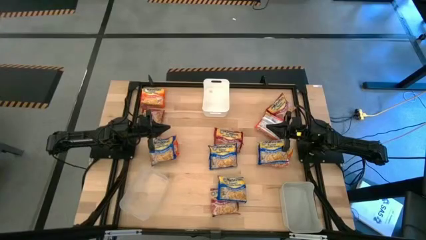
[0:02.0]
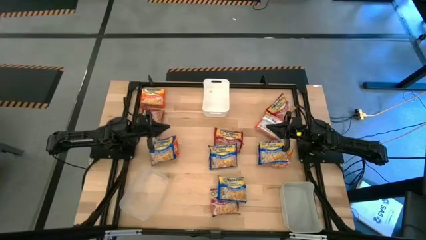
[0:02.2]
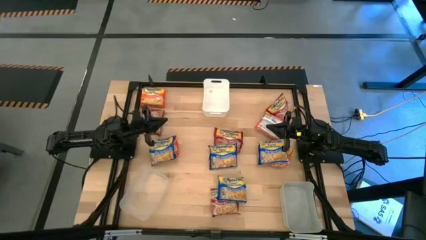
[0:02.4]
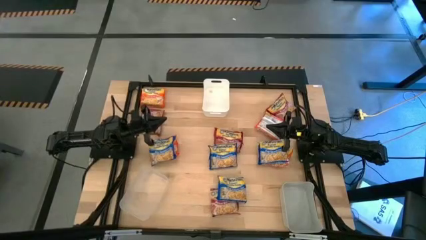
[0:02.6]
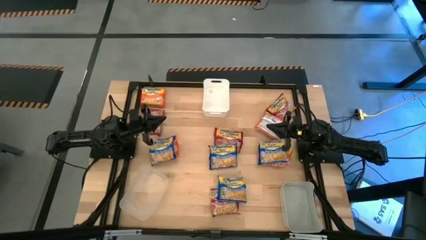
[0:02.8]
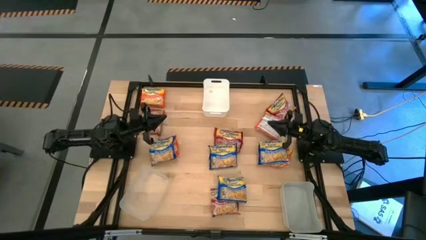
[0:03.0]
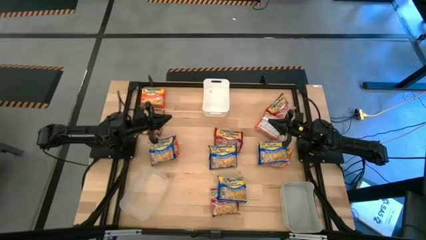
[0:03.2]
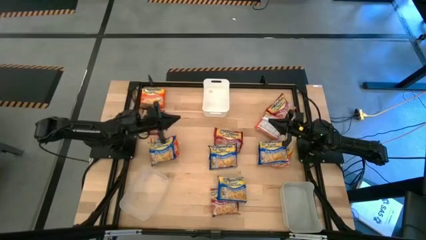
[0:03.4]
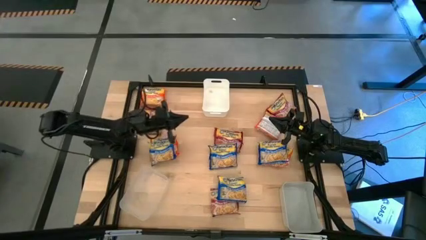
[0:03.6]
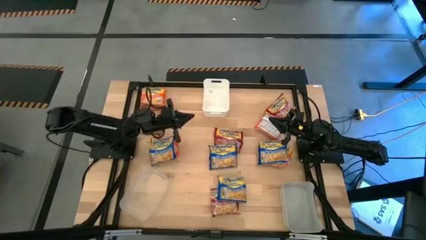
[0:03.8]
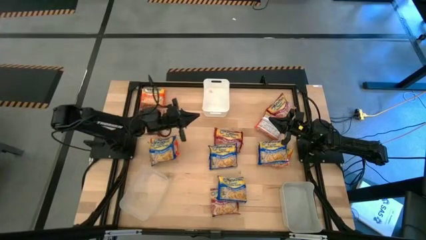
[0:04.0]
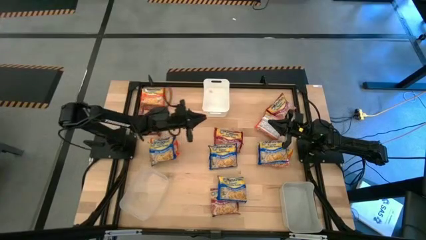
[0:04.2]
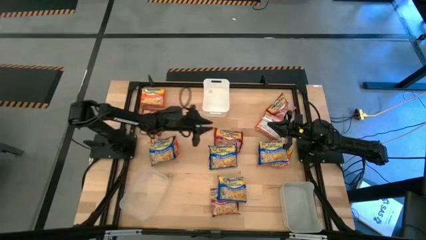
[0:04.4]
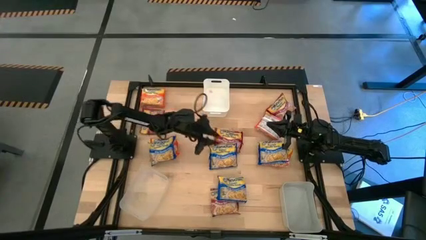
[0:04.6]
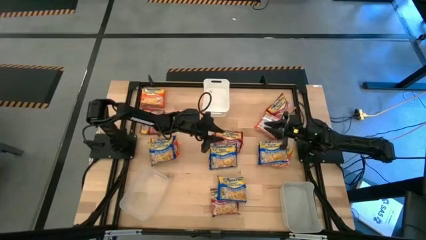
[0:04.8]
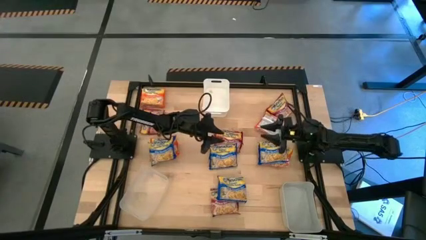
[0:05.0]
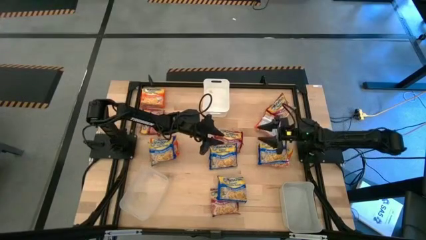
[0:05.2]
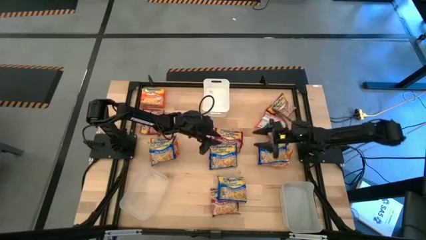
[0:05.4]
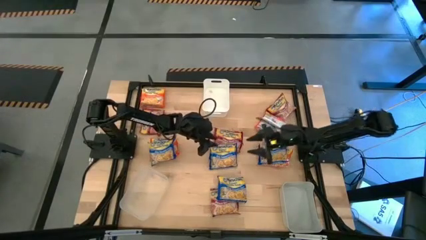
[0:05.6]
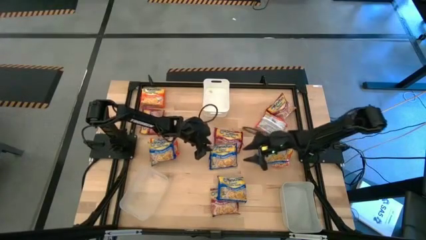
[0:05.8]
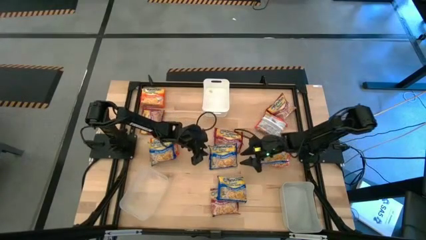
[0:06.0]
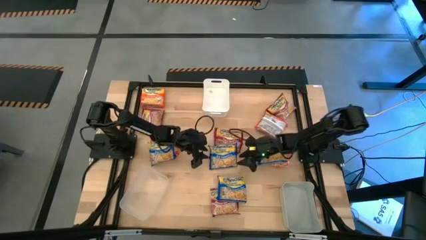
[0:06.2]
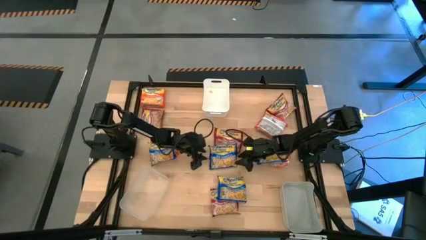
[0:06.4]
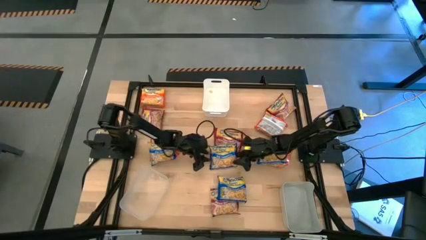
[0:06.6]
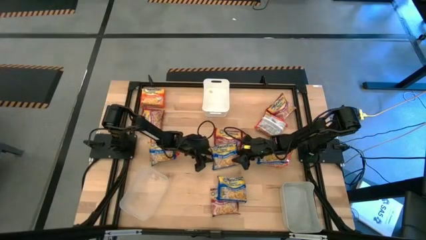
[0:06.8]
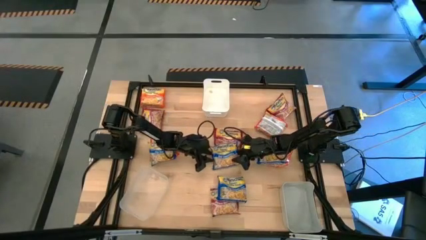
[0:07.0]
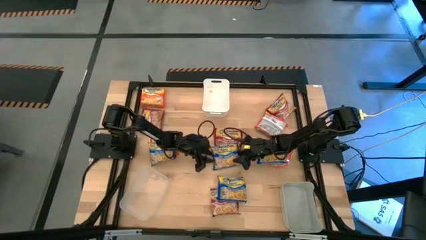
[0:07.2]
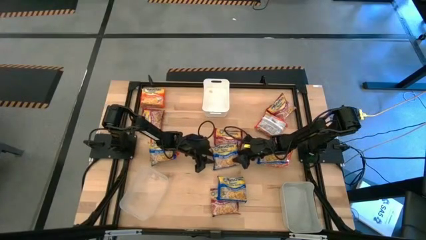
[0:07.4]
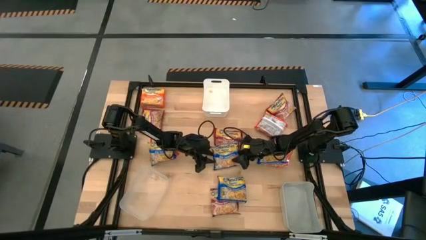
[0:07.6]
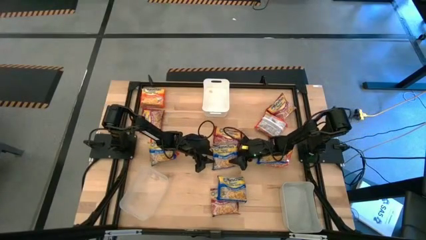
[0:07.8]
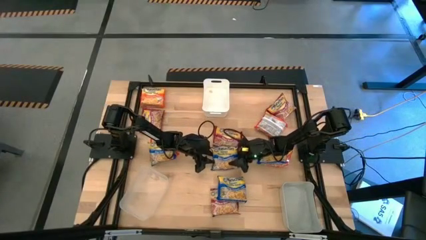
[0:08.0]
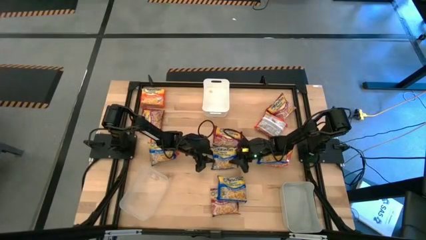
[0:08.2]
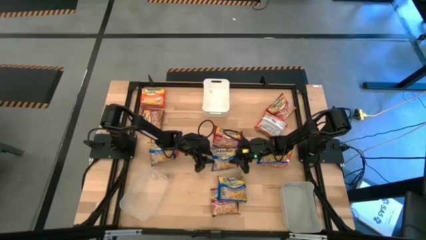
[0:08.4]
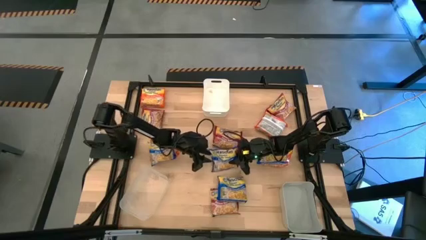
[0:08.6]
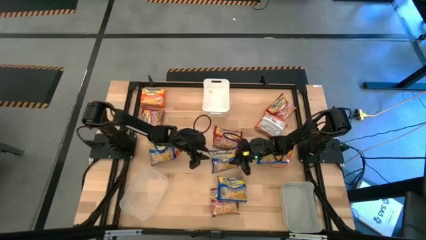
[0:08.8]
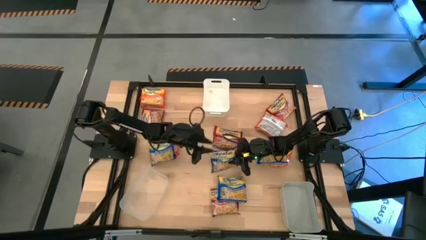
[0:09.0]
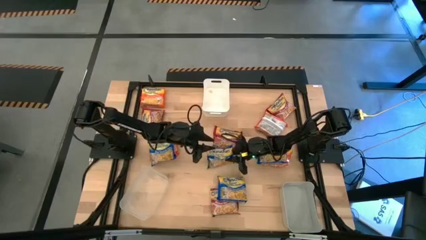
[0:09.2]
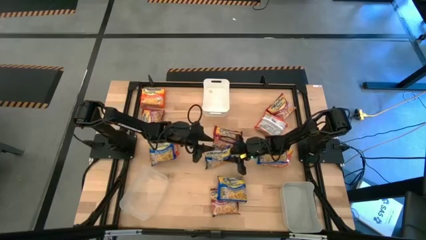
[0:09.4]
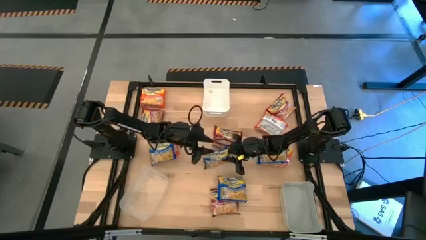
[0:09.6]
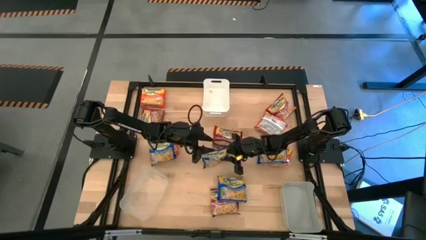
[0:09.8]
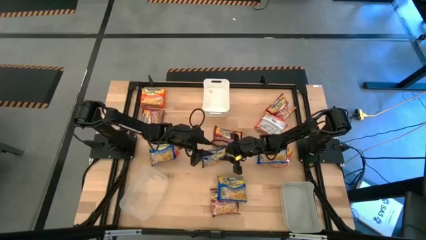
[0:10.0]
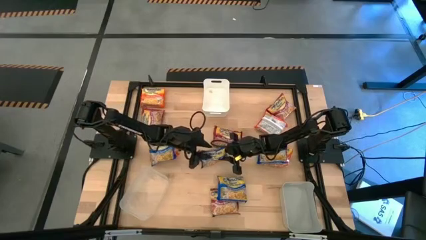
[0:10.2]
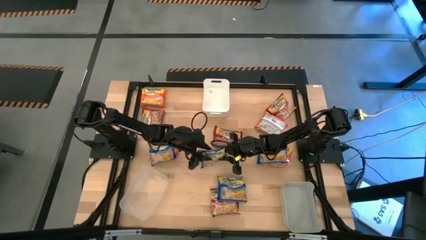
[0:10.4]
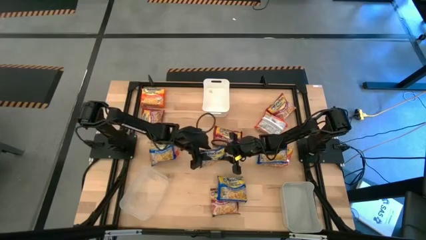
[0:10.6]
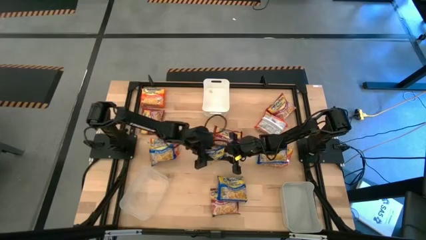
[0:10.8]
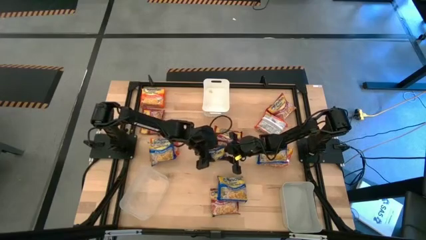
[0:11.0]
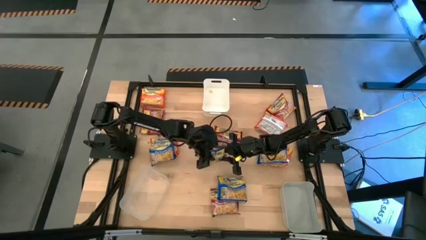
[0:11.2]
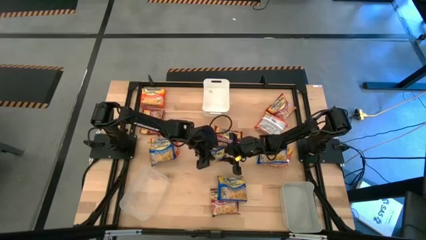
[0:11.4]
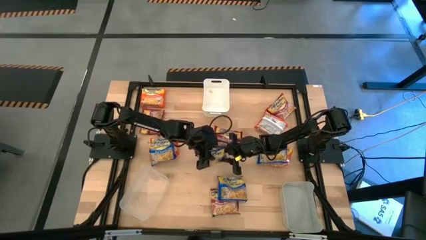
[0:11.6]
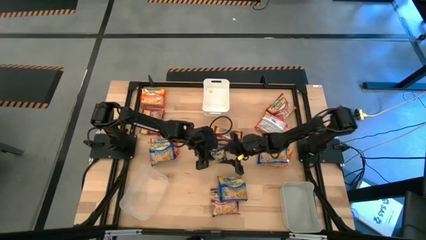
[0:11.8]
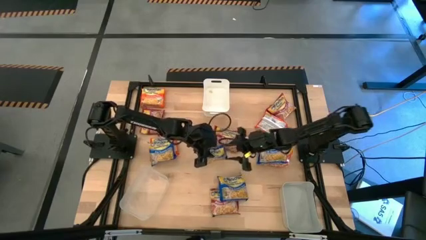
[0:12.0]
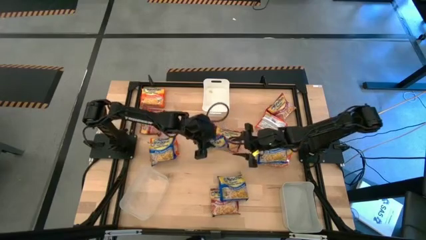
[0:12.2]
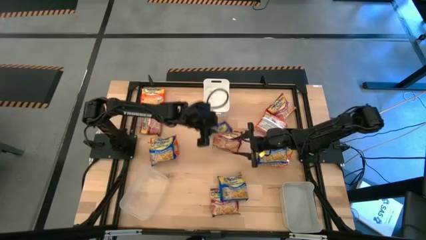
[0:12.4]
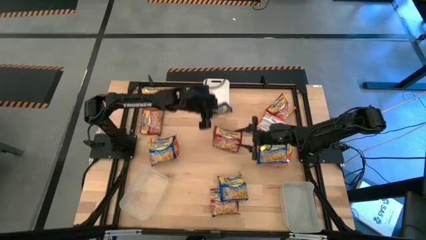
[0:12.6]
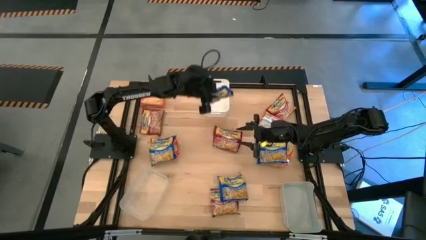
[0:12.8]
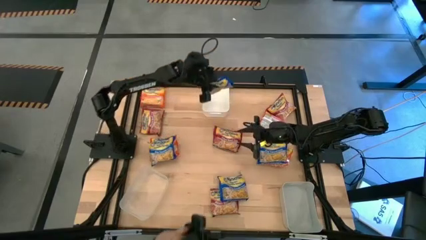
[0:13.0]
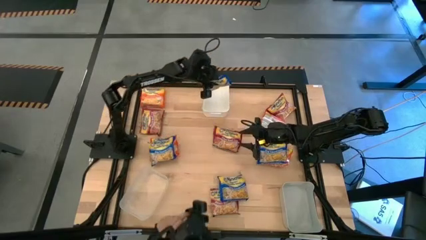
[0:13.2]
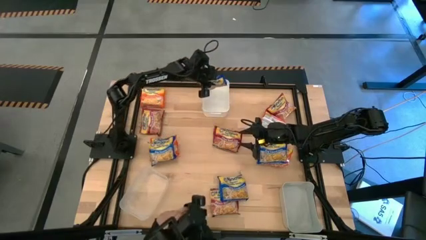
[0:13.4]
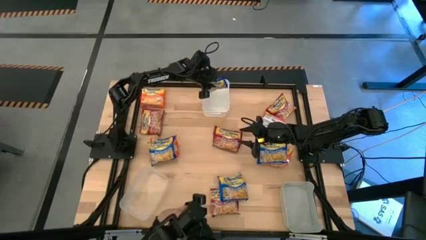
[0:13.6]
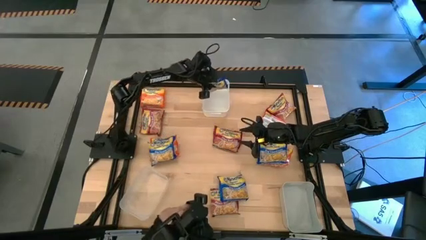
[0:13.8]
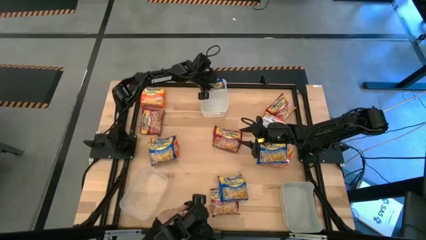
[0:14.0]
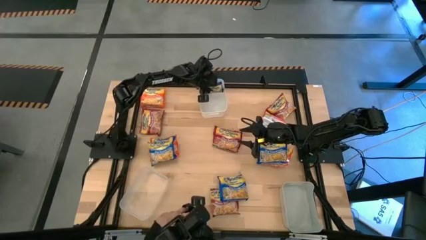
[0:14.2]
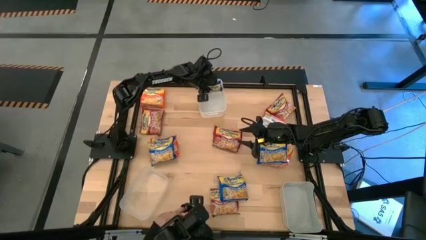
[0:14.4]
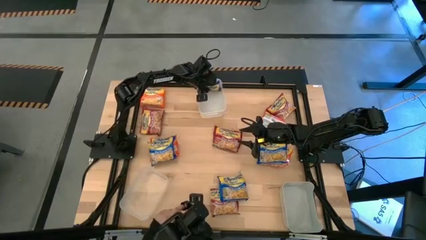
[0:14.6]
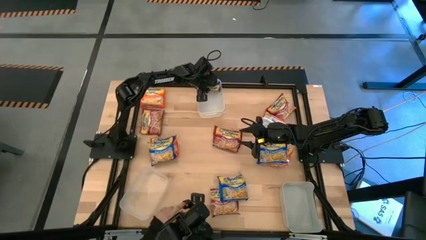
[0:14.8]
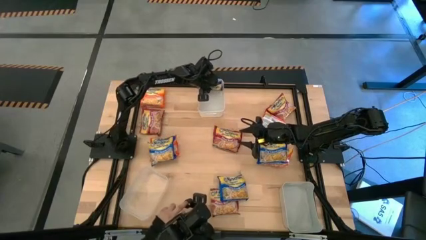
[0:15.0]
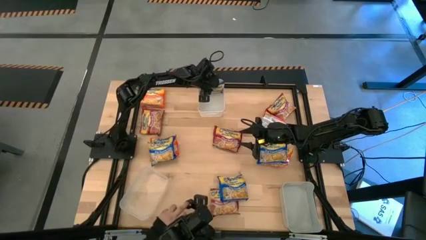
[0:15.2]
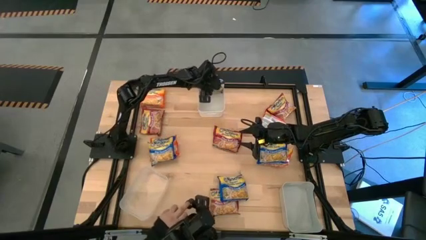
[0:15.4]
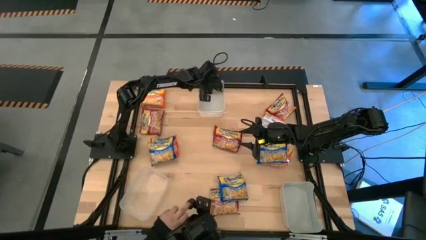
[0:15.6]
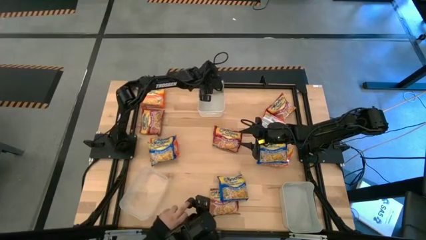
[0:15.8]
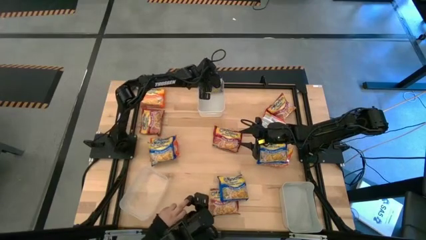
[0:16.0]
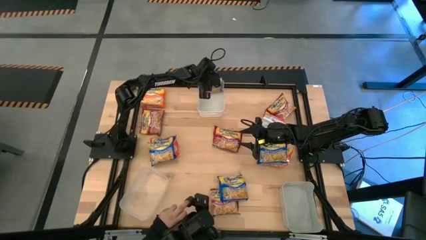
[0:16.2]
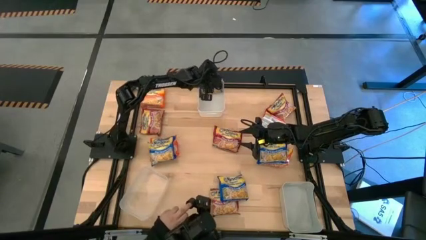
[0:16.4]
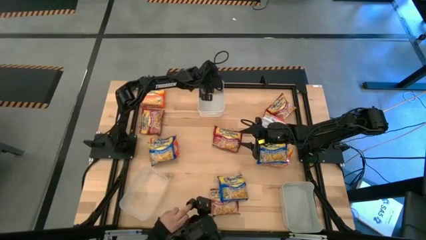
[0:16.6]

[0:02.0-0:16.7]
Task: Sort Maruchan noodles
Put the blue noodle pack into the white bin
